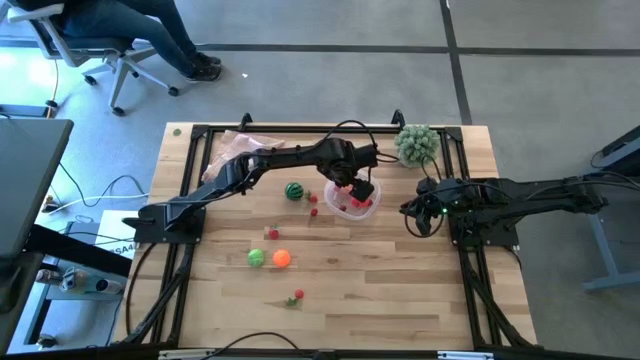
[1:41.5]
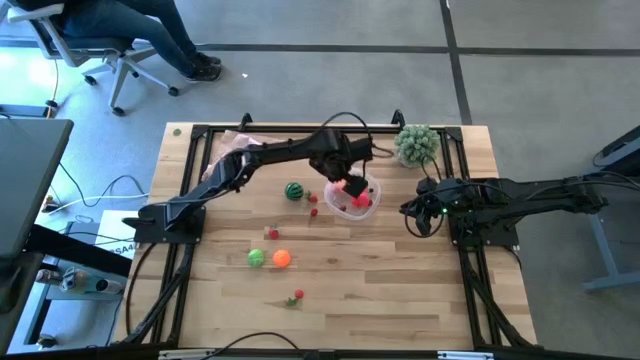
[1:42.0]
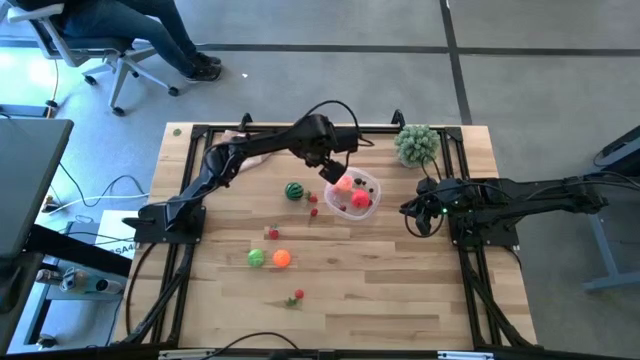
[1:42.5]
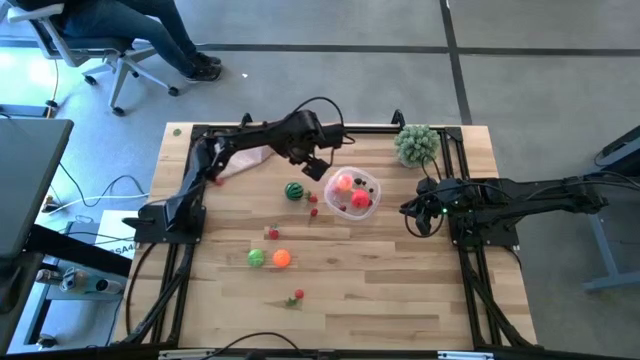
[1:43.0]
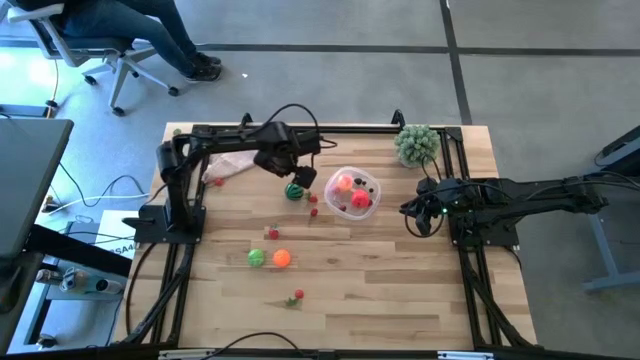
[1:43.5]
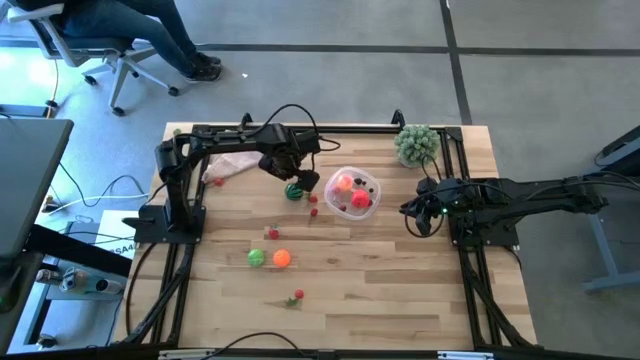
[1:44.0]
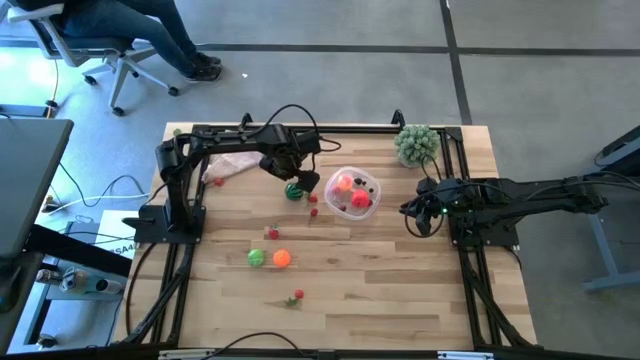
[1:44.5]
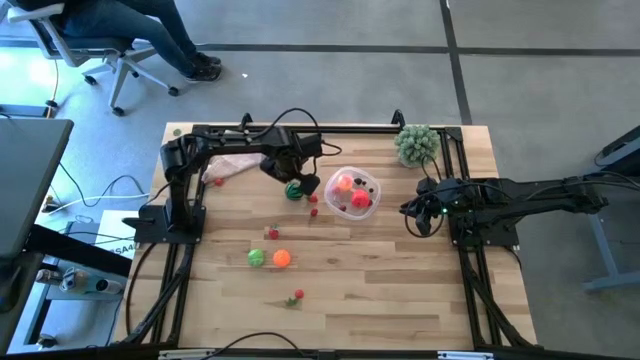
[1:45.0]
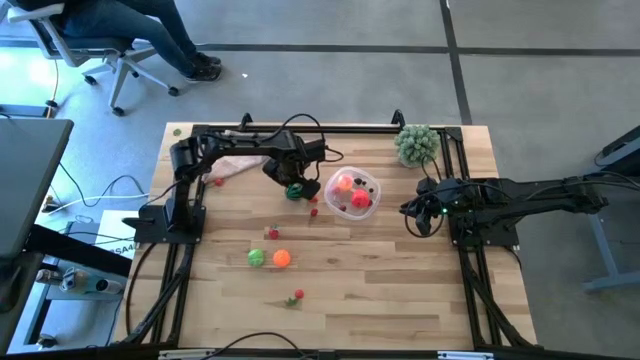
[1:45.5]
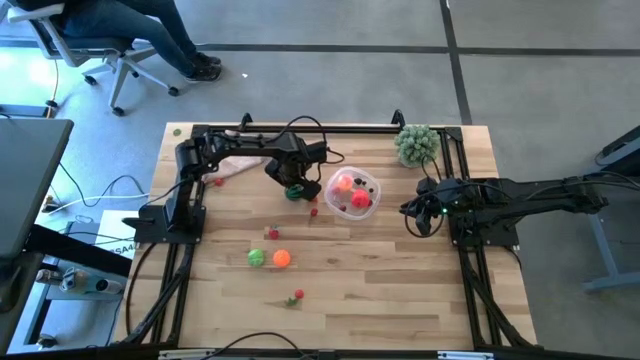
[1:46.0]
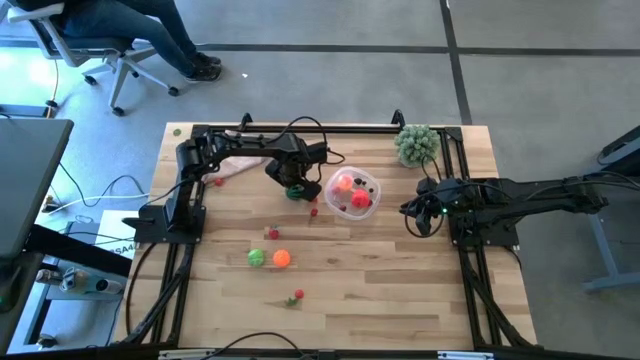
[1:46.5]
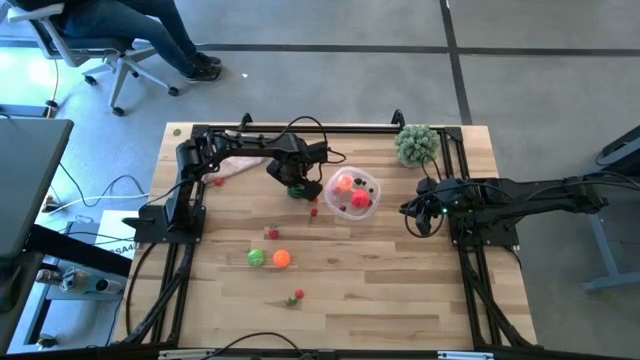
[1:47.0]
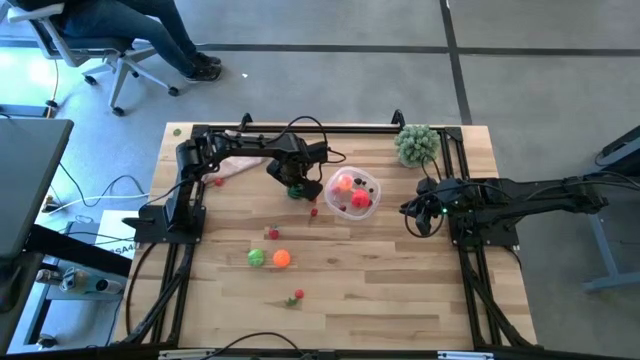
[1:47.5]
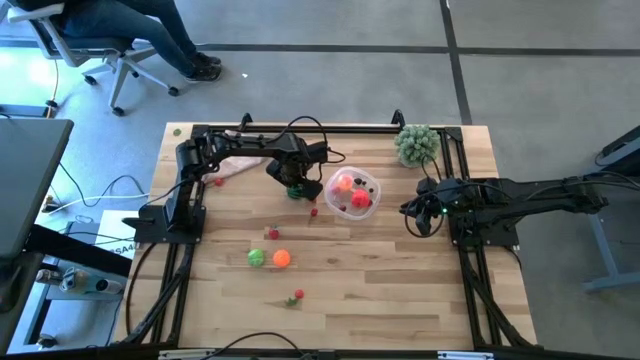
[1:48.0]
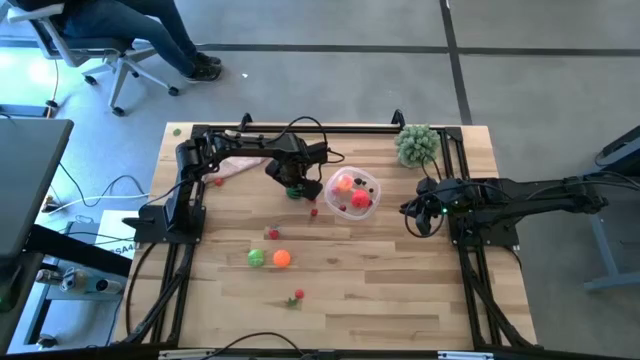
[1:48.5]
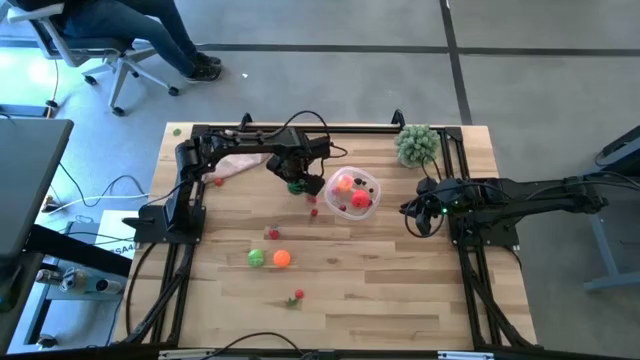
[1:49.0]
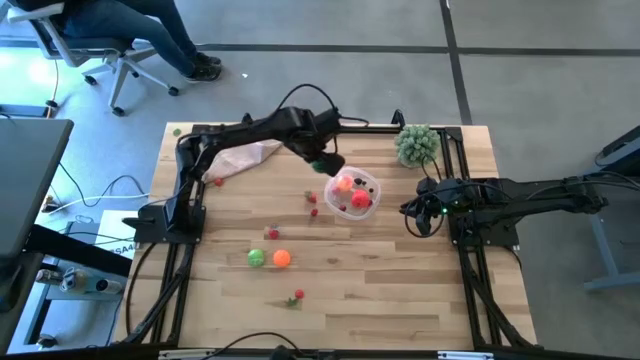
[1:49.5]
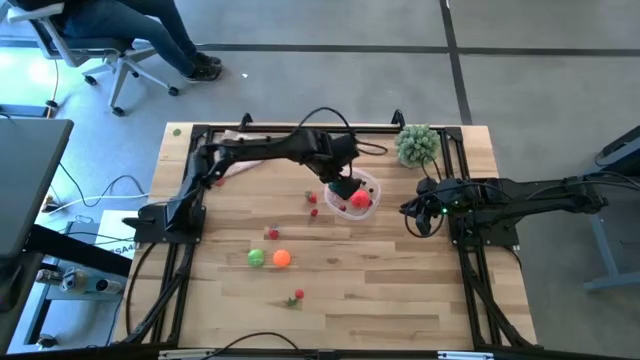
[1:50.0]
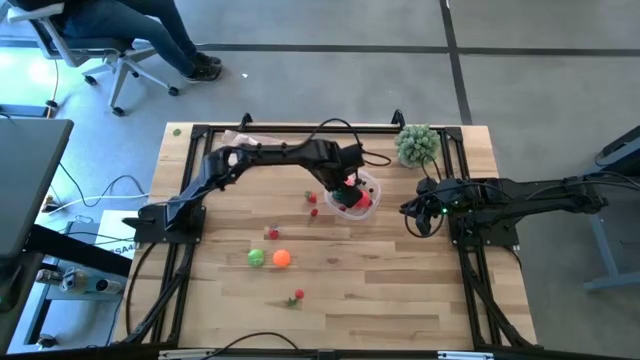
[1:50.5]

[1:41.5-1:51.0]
Task: Pick and placing Produce into tupperware
Put the watermelon into the transparent bin

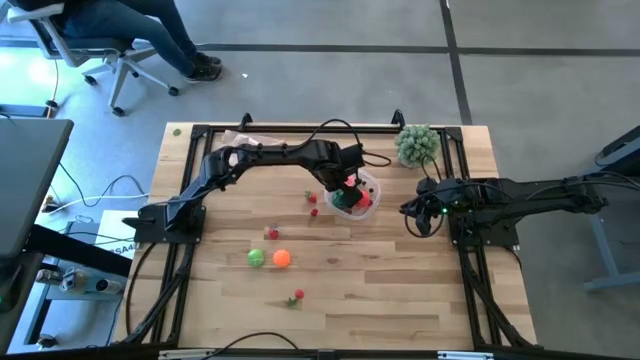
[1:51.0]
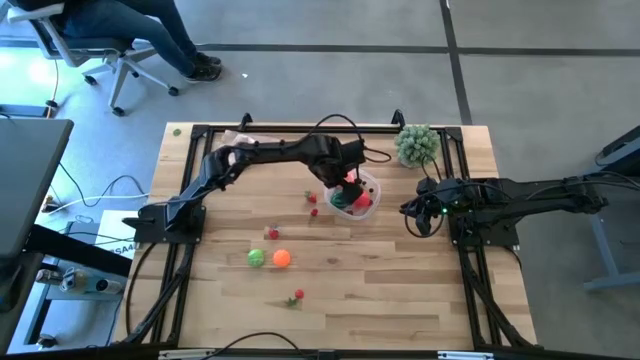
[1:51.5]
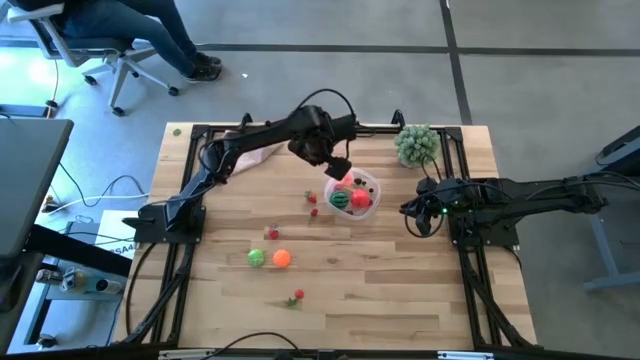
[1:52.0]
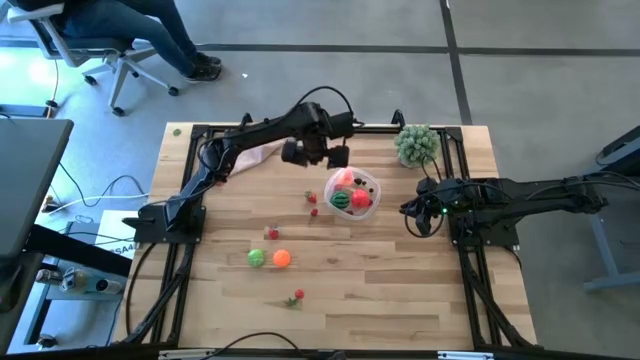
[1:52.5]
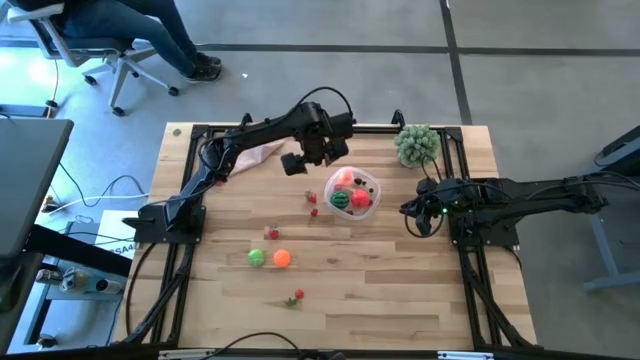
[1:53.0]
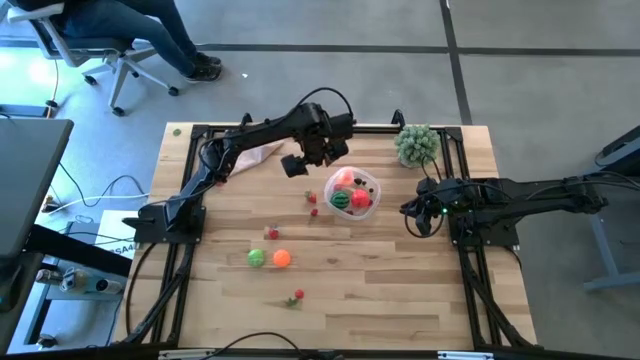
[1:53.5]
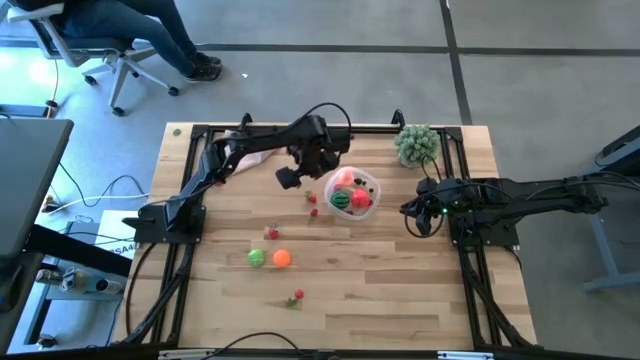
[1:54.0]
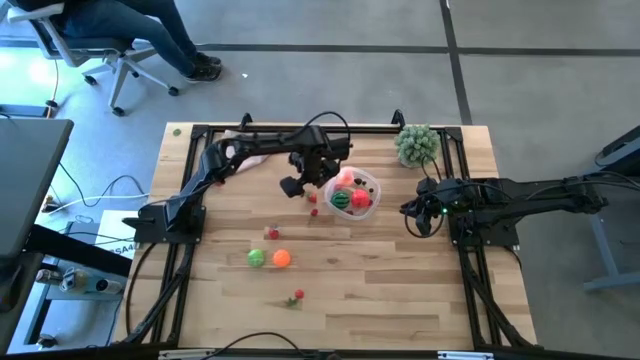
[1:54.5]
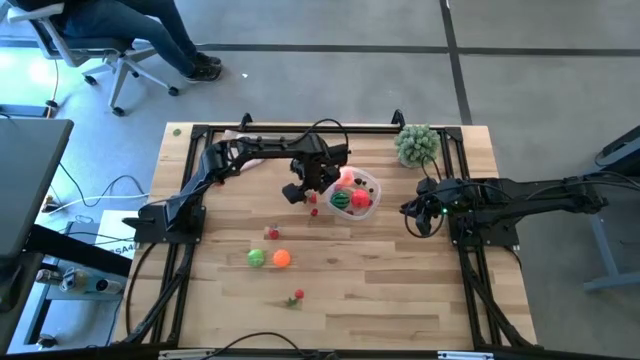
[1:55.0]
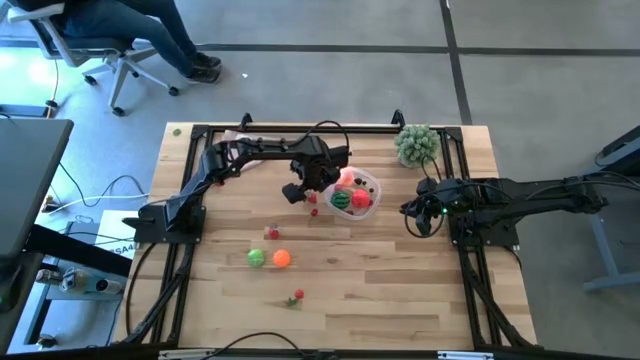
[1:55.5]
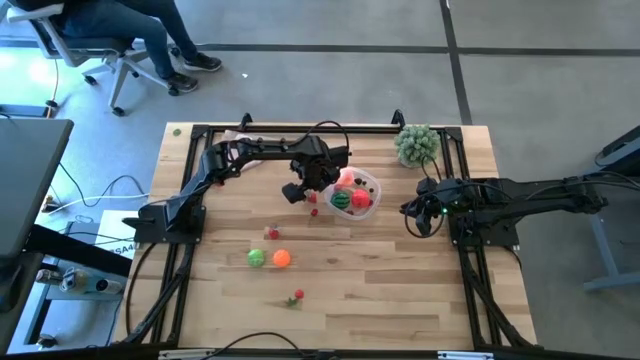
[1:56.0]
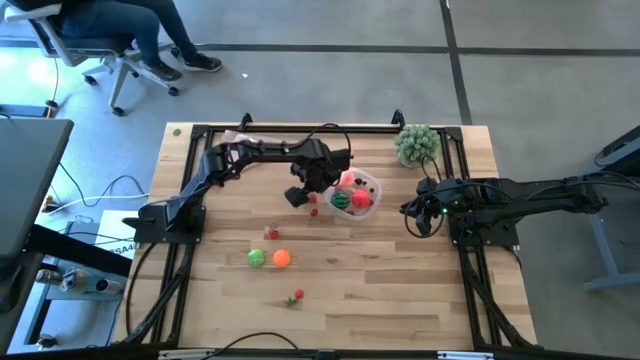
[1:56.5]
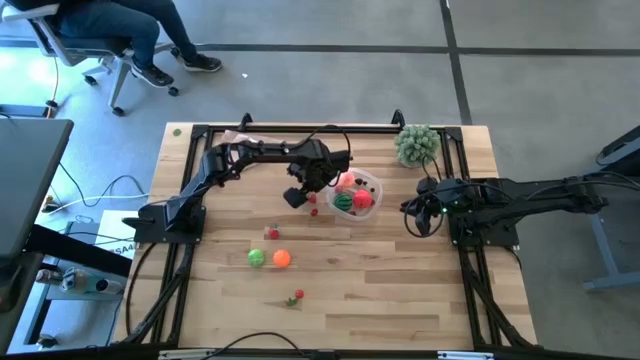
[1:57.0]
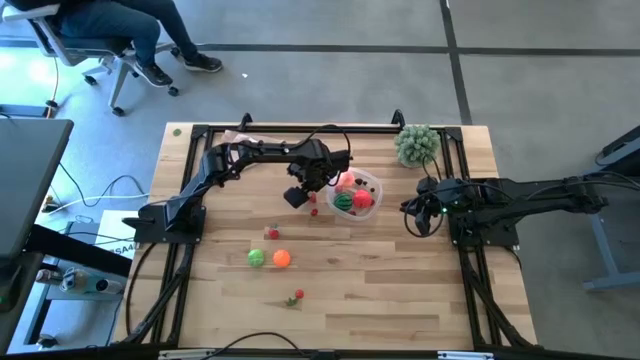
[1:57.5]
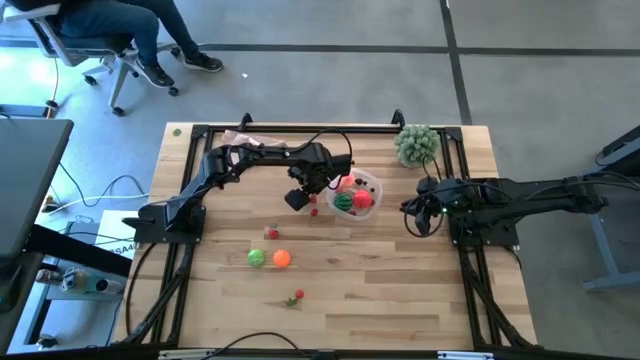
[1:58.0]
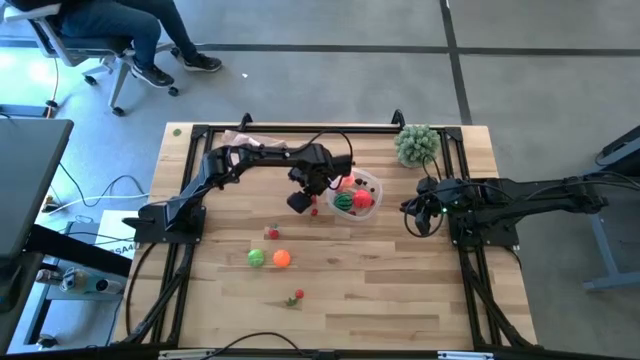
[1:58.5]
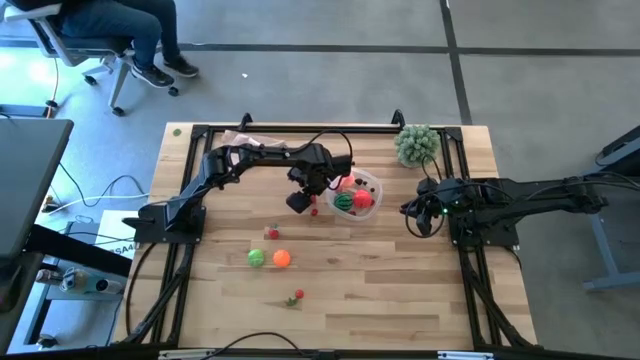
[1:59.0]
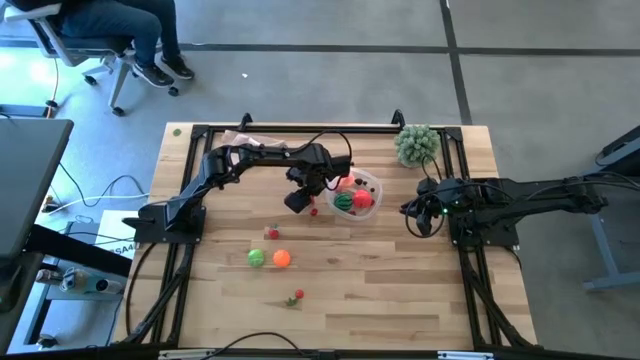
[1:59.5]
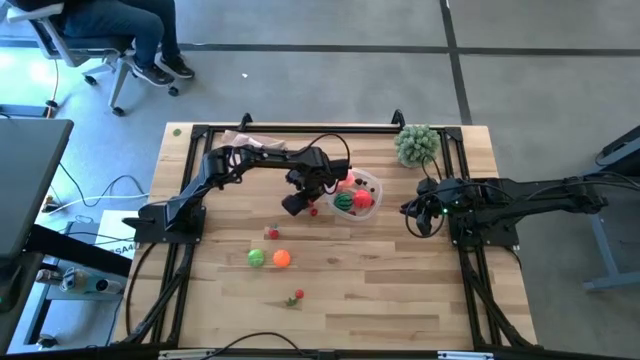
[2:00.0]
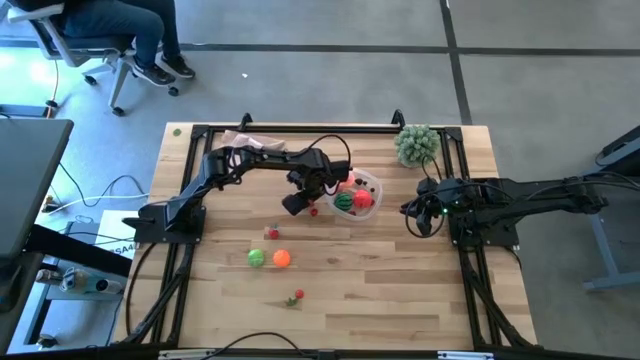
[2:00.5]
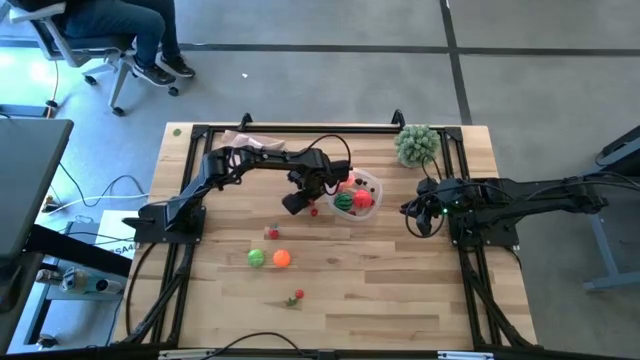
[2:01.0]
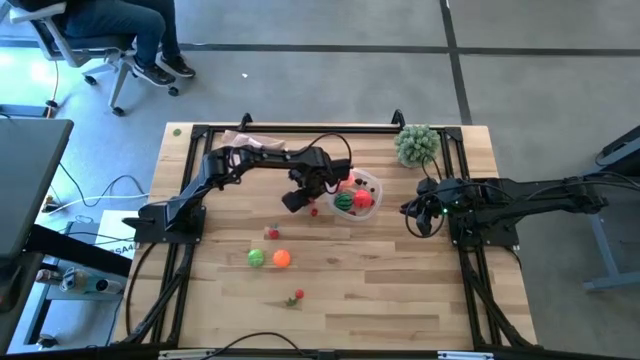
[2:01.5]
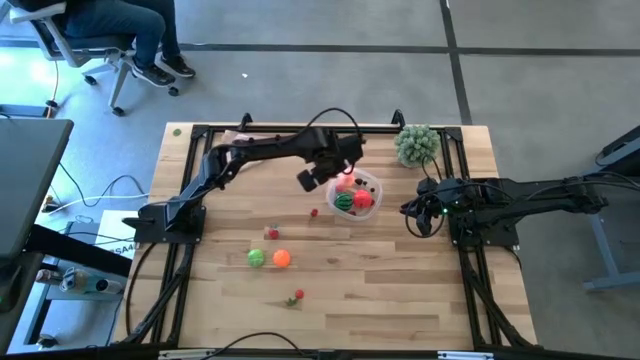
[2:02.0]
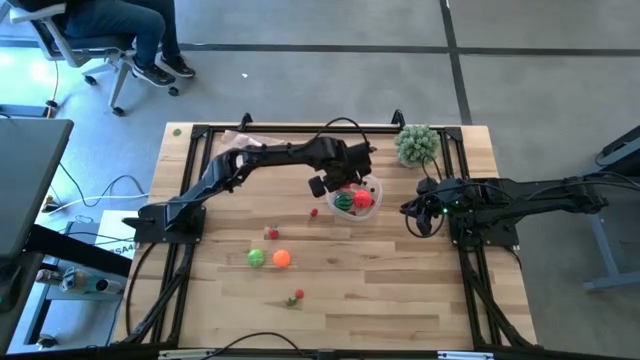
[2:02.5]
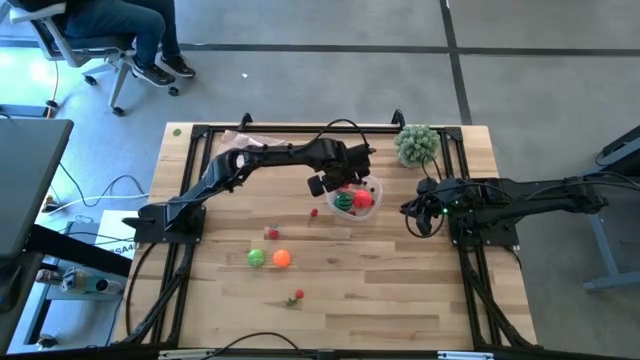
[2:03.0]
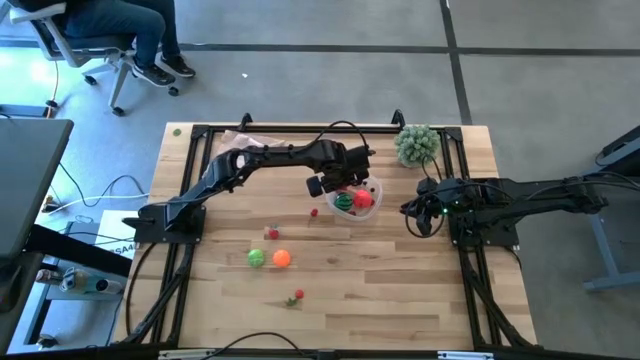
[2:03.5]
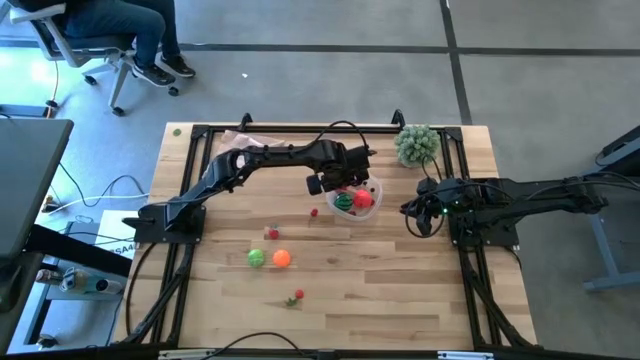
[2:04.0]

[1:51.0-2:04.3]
Put the strawberry into the transparent bin
